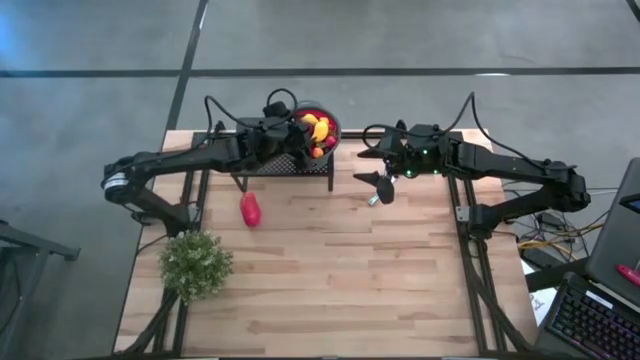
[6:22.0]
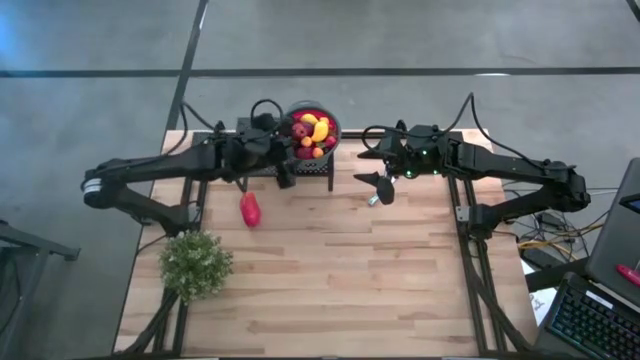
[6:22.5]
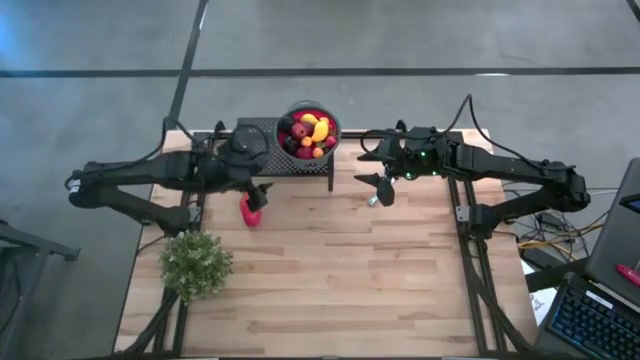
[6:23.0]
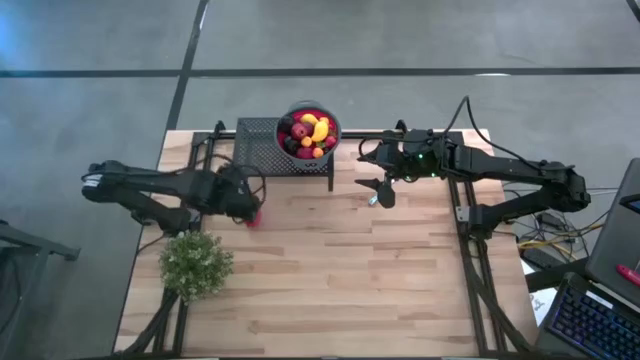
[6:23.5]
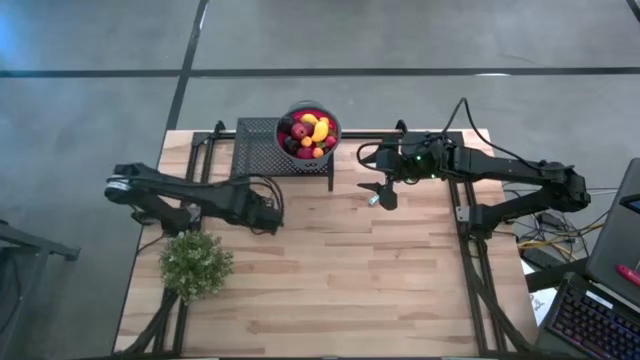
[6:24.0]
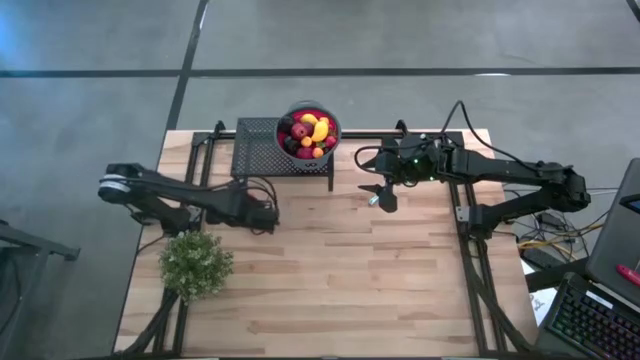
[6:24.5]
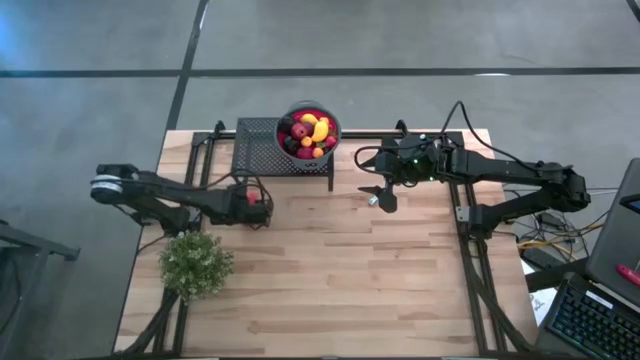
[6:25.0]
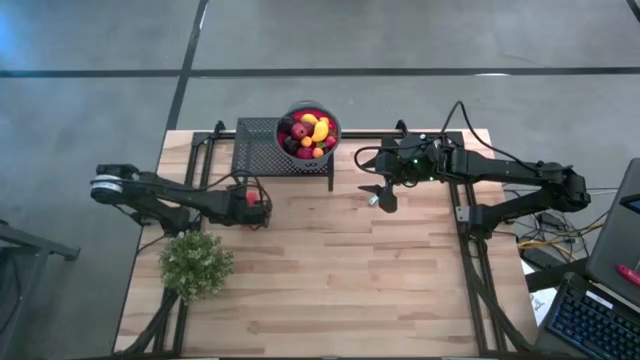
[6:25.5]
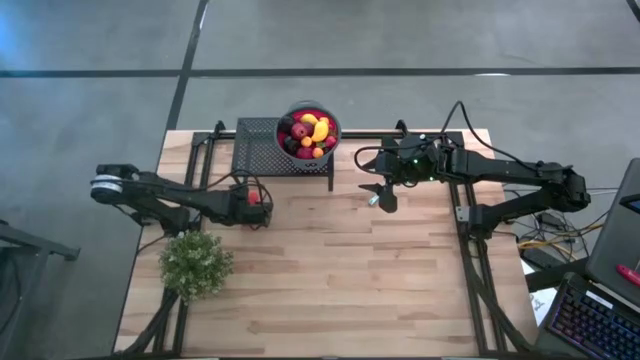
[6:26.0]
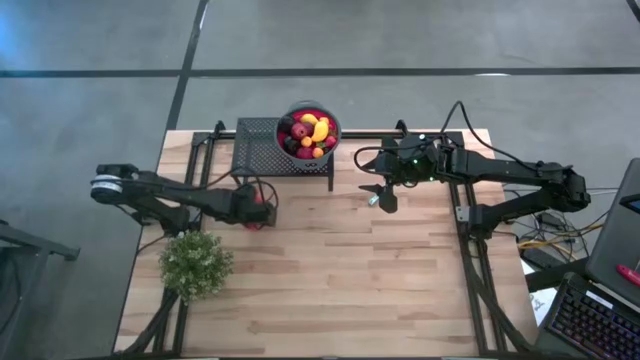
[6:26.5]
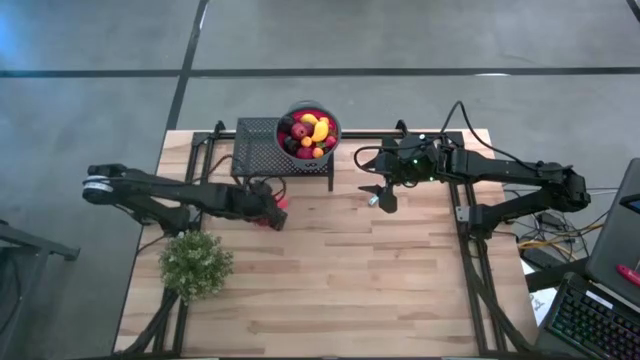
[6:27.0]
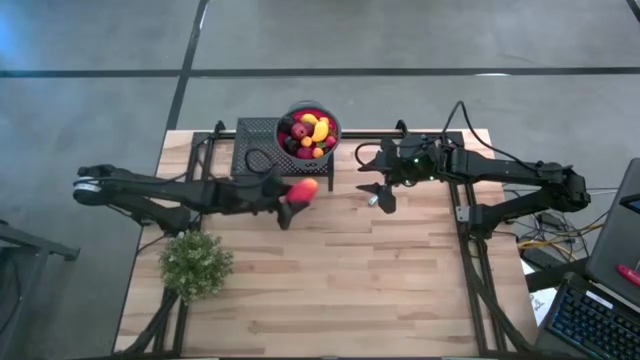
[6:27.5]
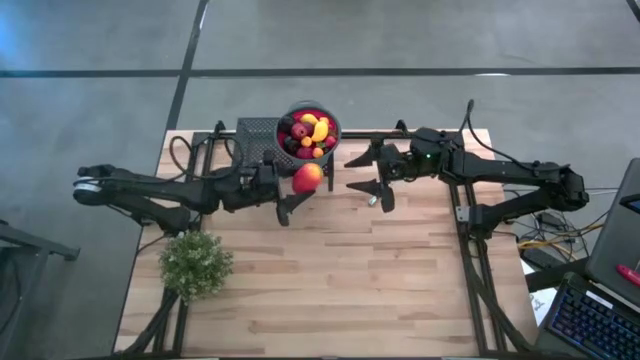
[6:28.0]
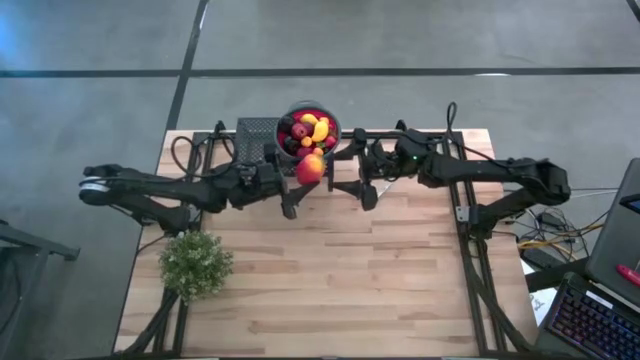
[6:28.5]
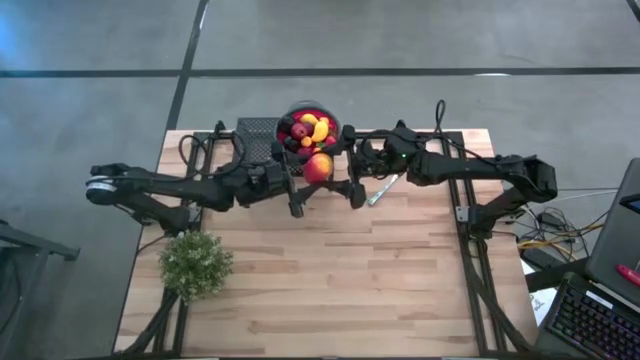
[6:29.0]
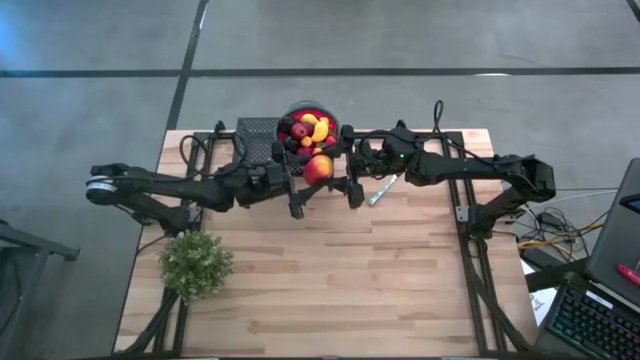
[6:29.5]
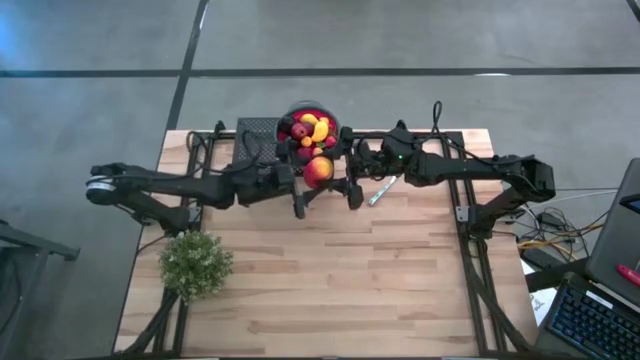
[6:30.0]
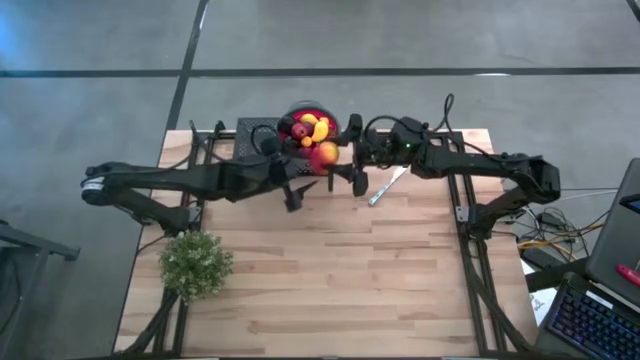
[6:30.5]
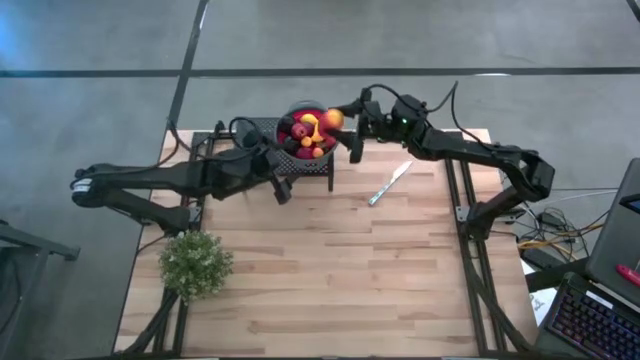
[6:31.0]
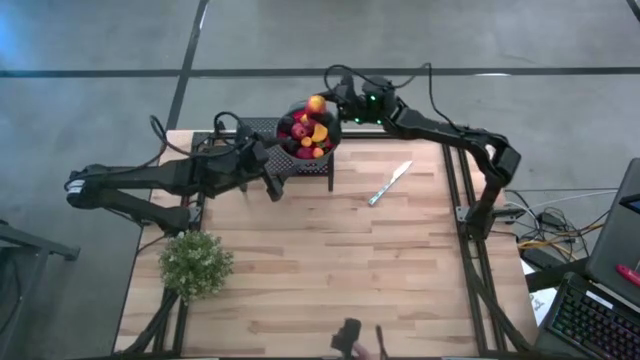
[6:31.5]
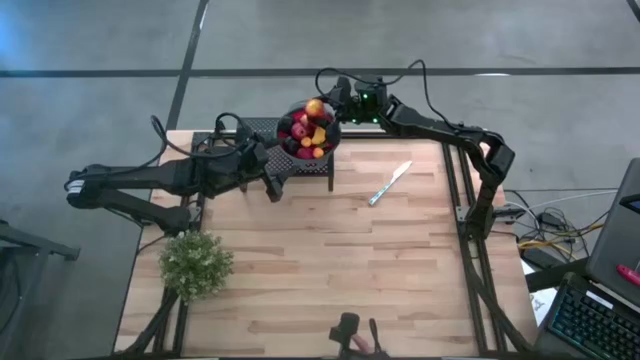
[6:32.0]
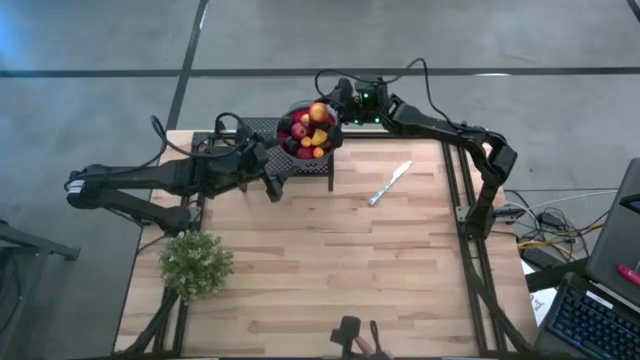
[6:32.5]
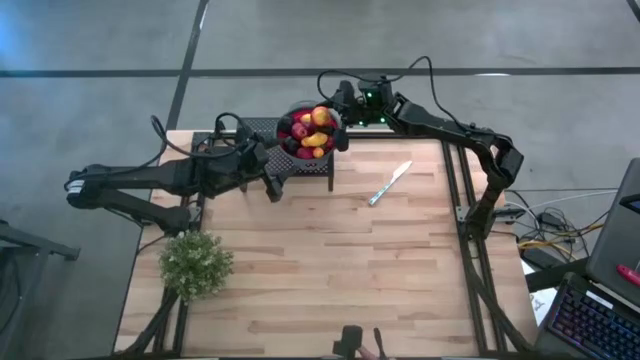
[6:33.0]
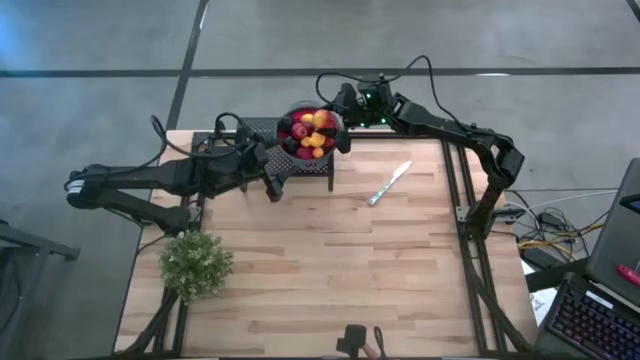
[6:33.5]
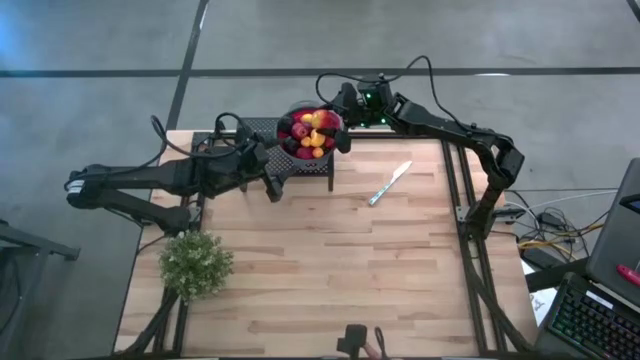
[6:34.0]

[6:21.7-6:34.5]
Task: Pick & Place Fruit
Put the orange mango into the red gray strainer bowl on the shelf

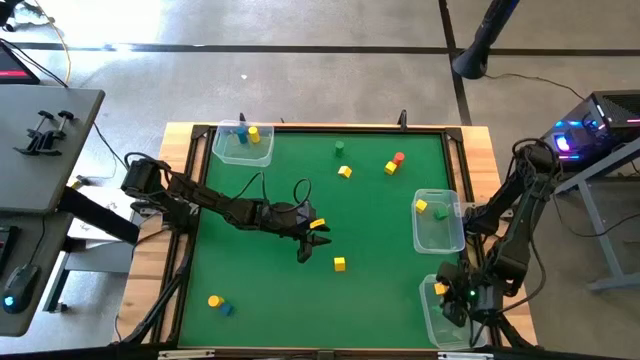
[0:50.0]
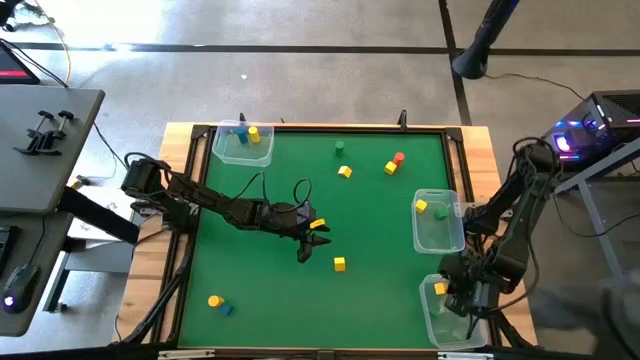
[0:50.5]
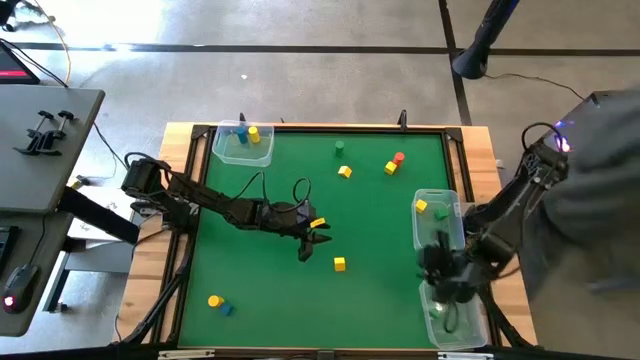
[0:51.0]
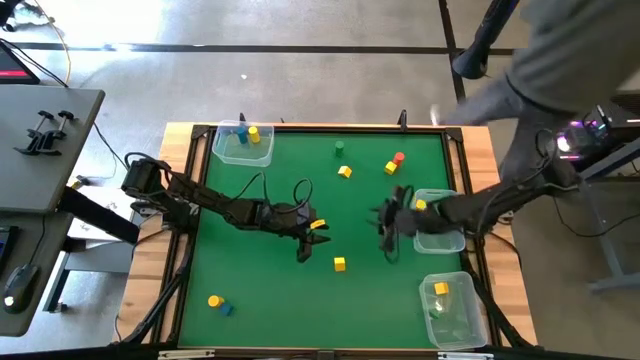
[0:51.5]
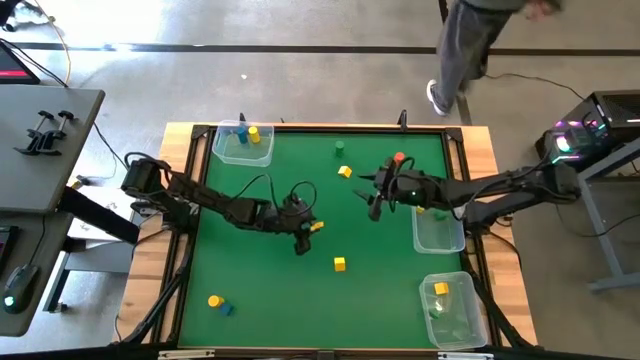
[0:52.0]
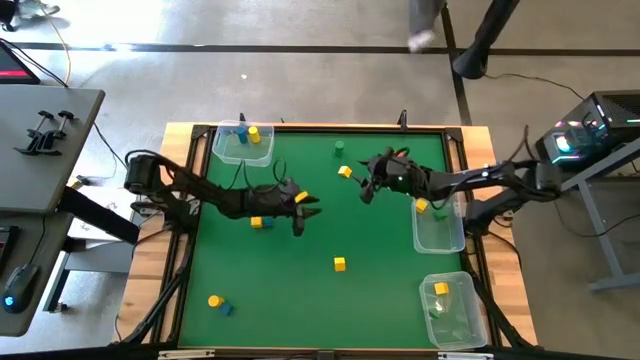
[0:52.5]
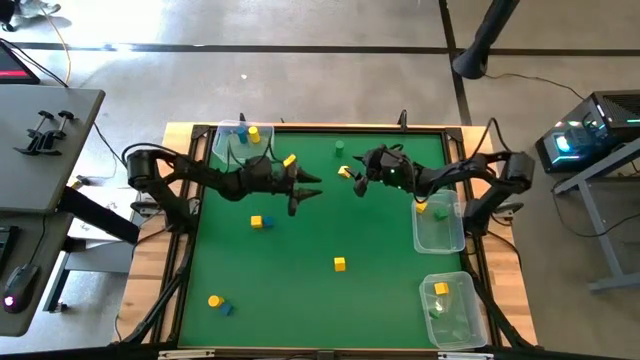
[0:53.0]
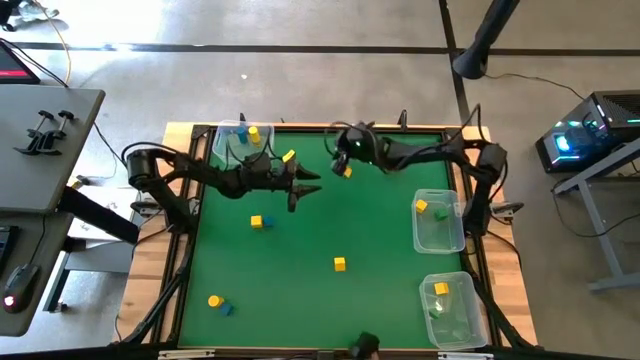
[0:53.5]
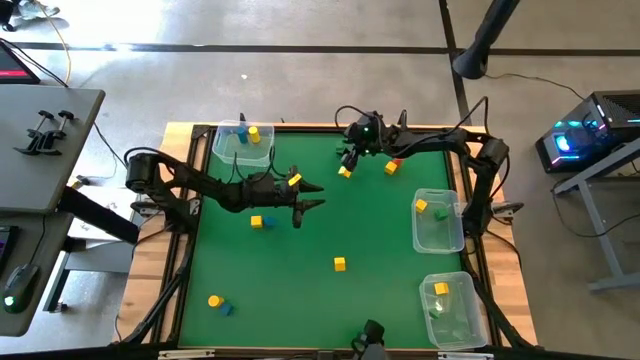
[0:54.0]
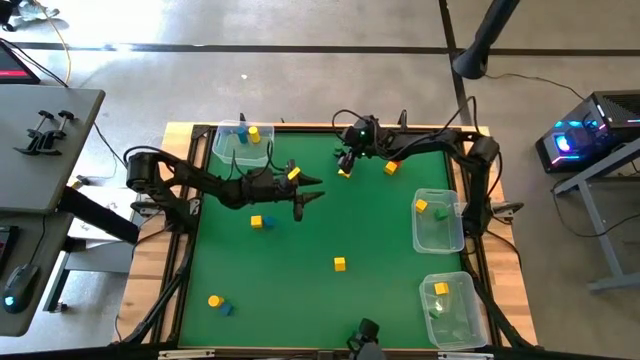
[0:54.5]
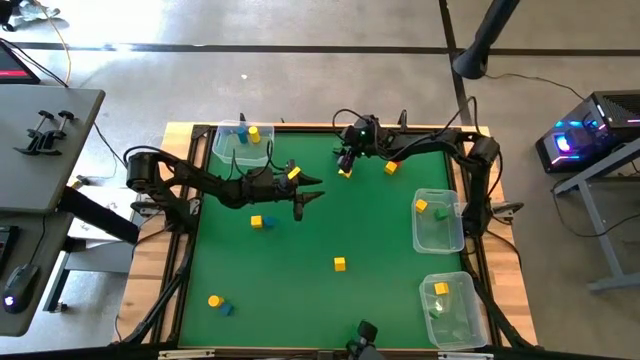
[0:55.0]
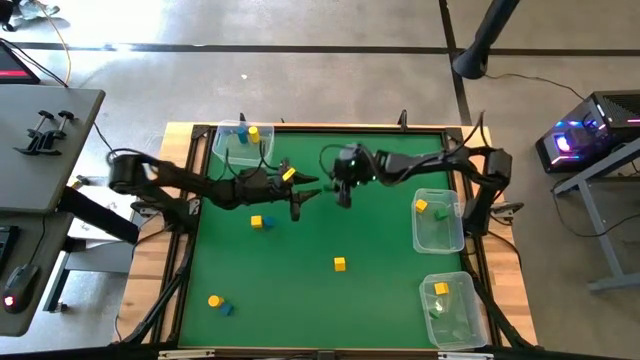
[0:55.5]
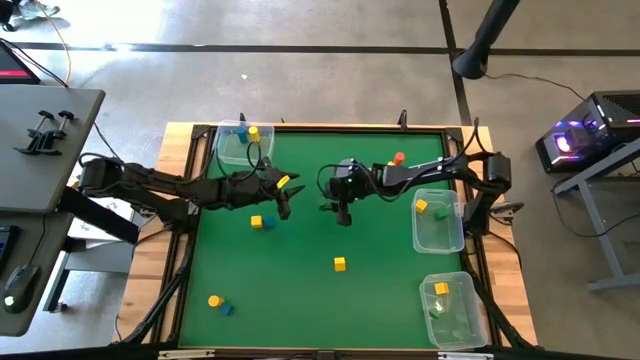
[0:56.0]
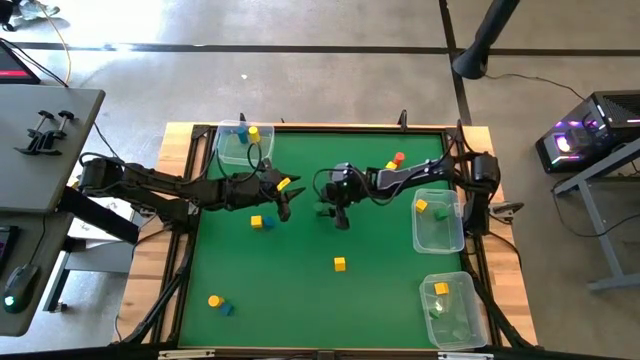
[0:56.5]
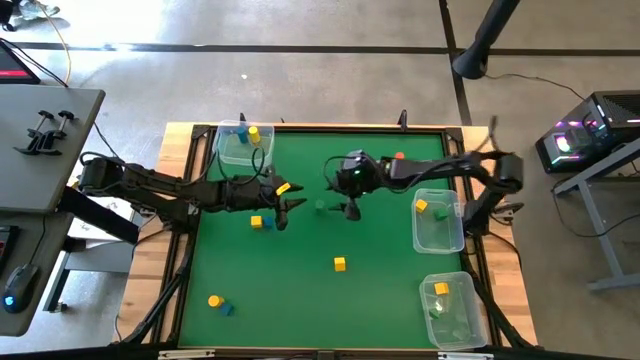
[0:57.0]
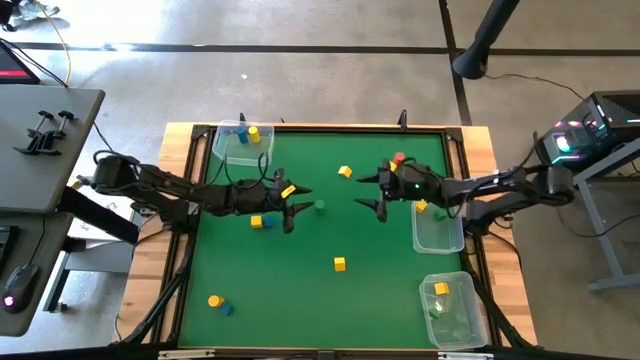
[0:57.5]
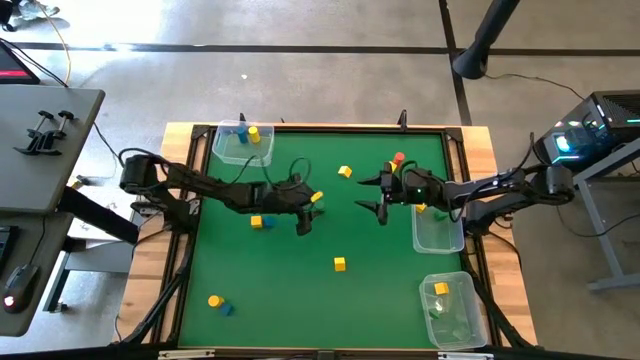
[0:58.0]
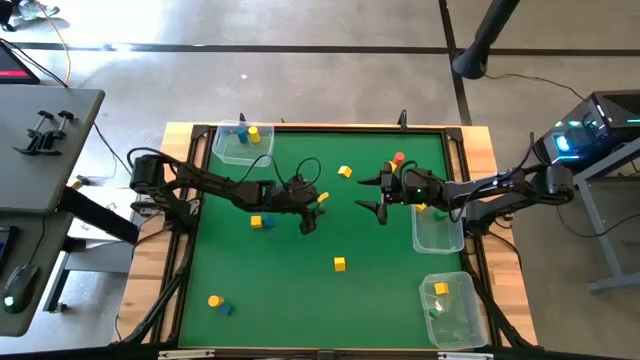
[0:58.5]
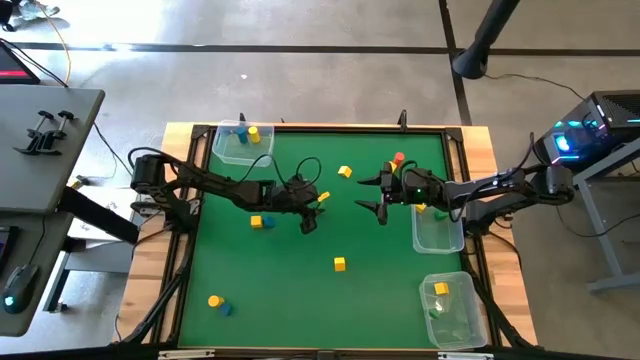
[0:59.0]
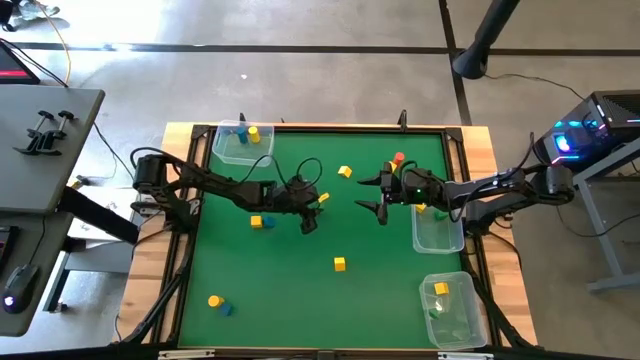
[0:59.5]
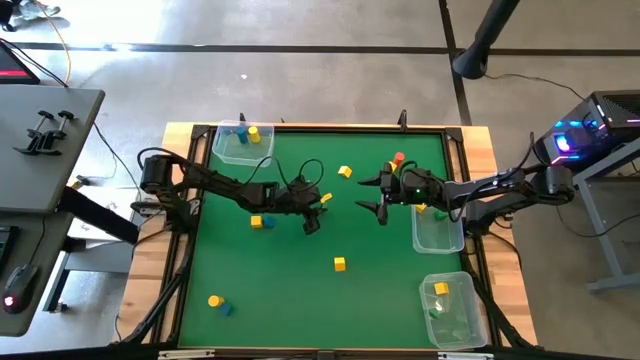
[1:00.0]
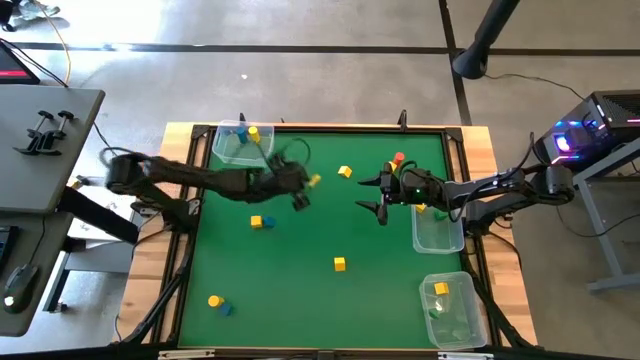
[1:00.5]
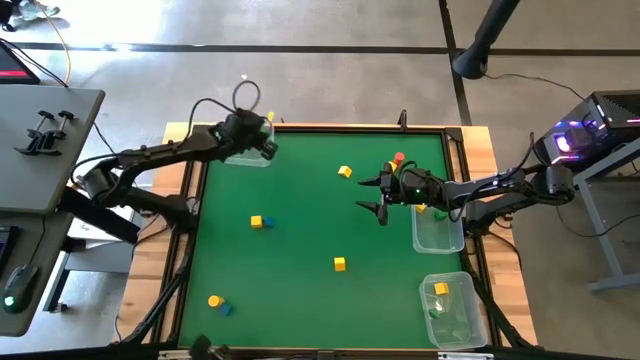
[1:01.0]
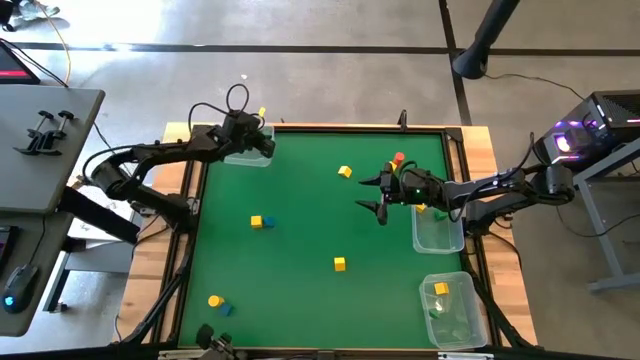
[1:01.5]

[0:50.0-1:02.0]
Task: Sort blocks by size
Put the green cylindrical block into the top transparent bin
